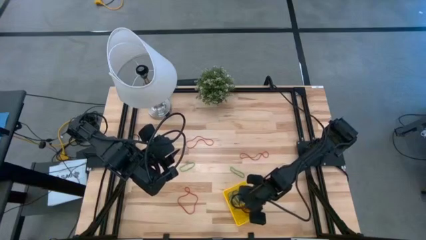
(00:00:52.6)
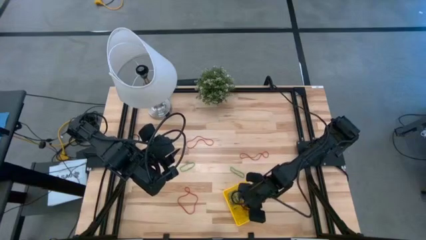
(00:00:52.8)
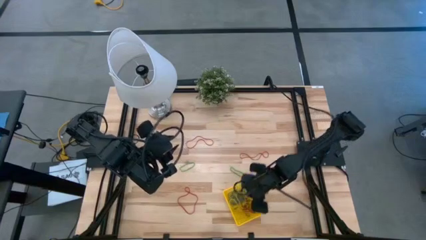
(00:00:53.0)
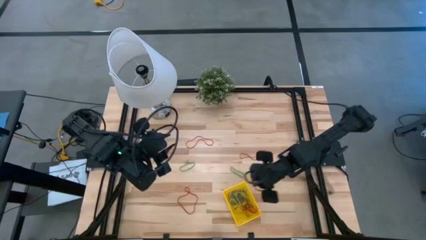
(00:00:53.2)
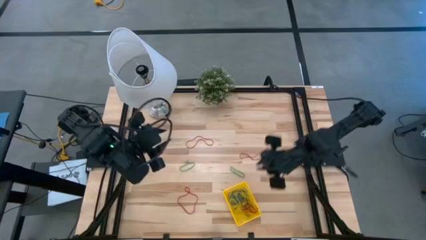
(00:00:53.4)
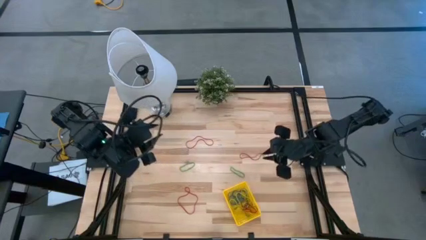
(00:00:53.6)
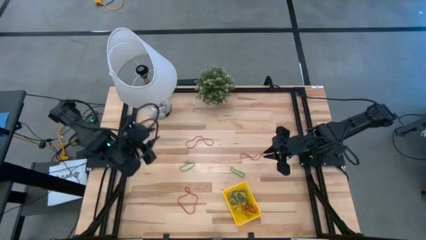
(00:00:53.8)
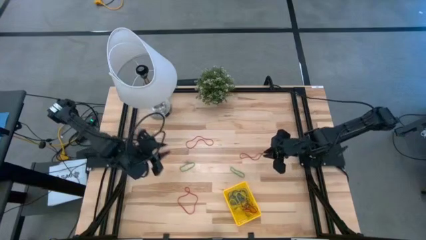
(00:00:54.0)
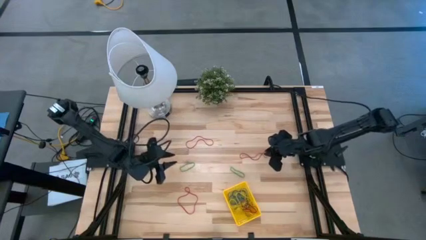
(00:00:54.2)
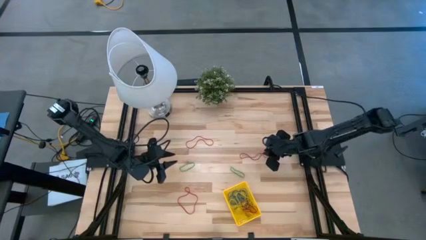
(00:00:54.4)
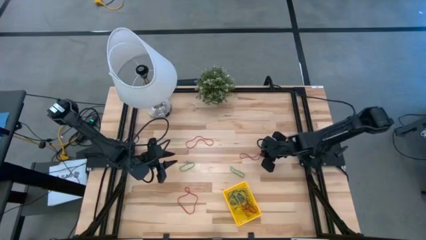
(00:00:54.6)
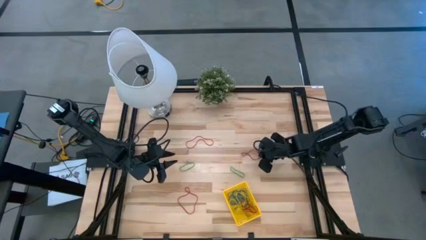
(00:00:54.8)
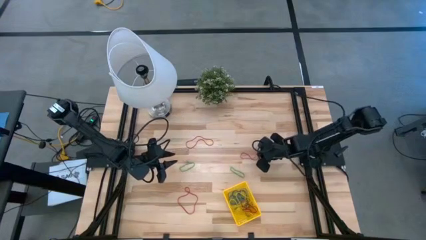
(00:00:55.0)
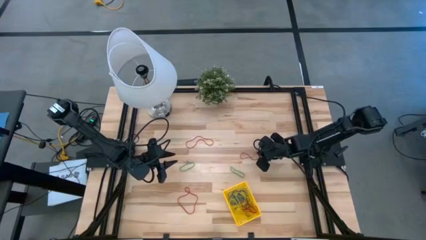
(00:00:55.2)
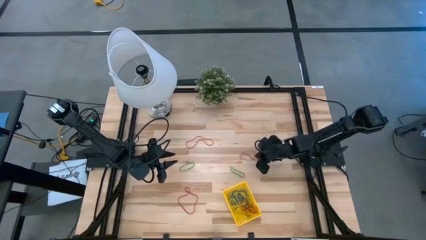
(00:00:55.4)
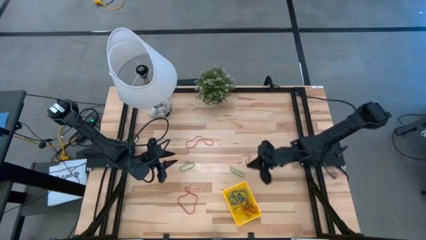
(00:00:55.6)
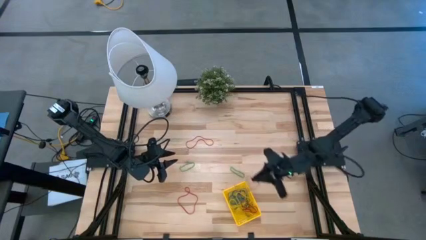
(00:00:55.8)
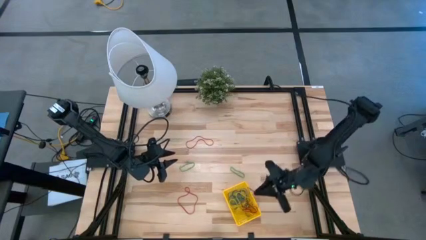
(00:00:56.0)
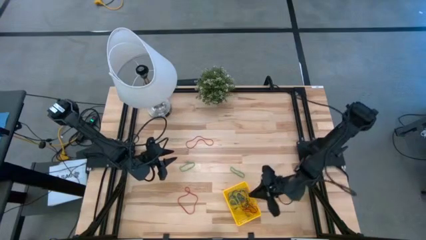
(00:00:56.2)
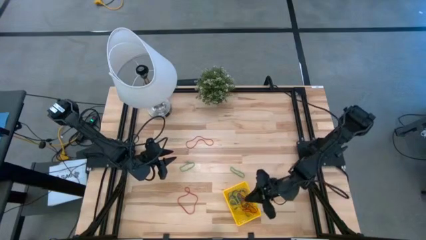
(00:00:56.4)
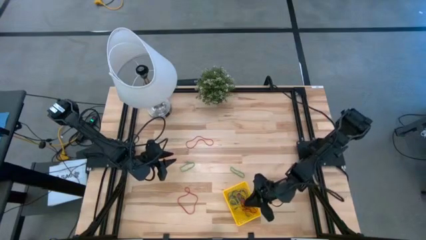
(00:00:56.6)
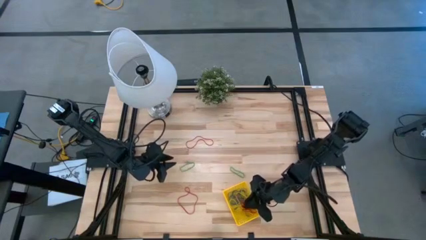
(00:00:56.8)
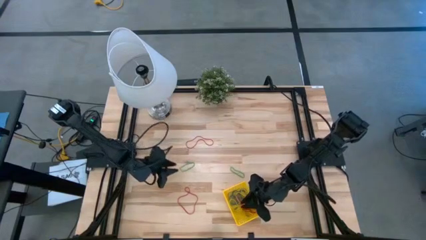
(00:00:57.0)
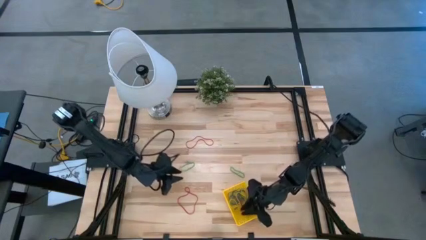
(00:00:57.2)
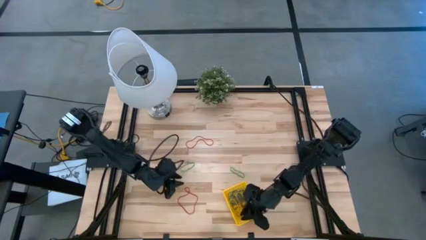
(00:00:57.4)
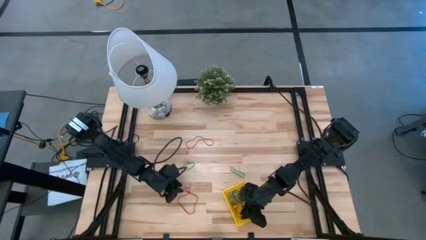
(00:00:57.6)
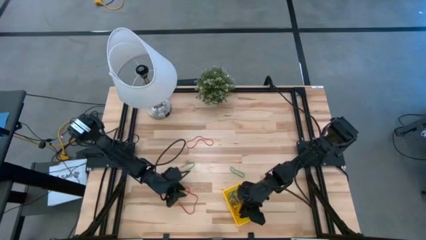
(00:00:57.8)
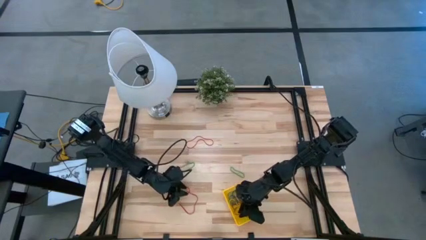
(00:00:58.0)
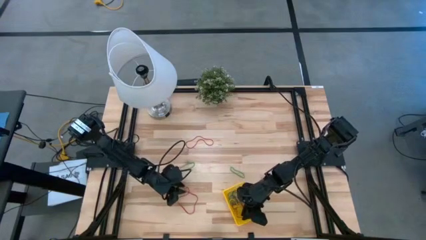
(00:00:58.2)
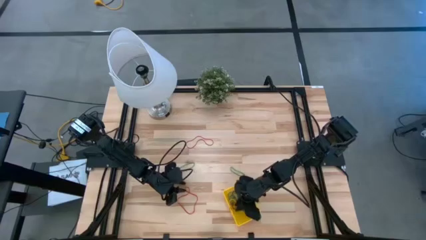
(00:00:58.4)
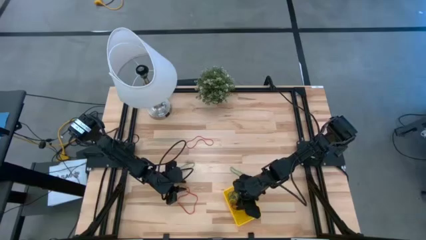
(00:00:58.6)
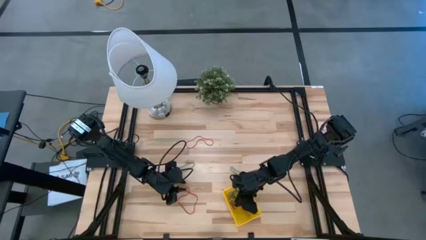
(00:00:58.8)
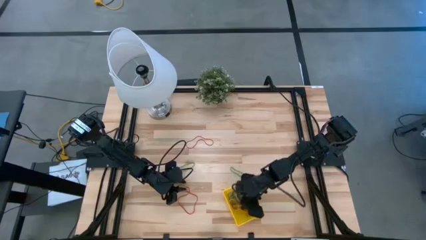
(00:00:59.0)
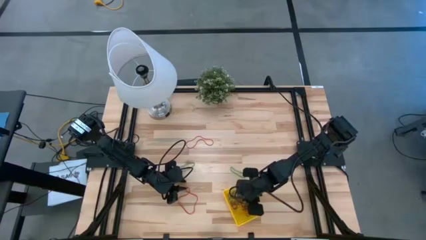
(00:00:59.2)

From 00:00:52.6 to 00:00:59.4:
Task: Pick and place items into bin
Put the right red rubber band into the bin

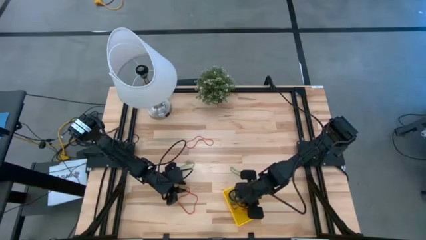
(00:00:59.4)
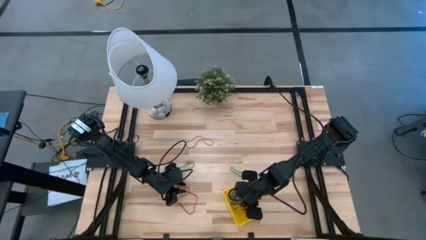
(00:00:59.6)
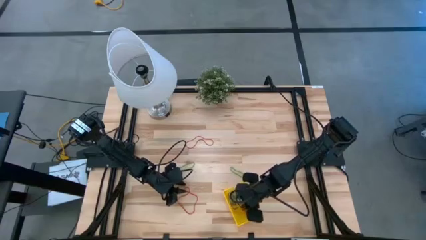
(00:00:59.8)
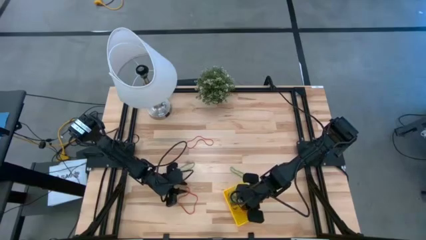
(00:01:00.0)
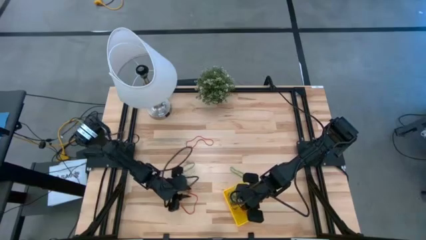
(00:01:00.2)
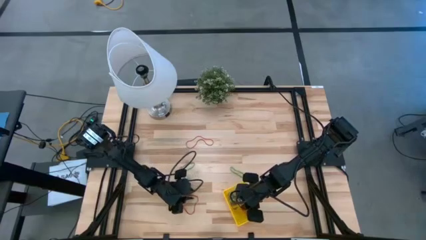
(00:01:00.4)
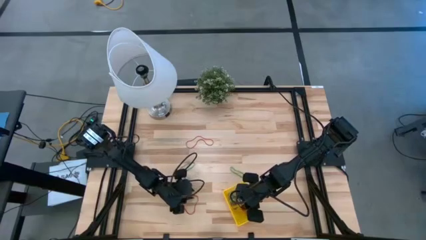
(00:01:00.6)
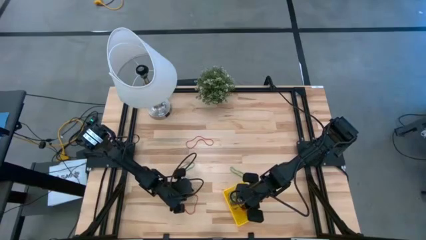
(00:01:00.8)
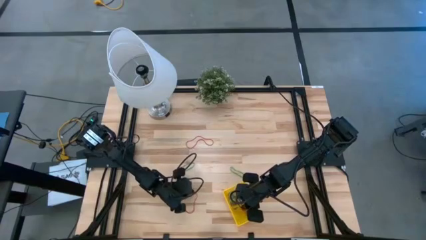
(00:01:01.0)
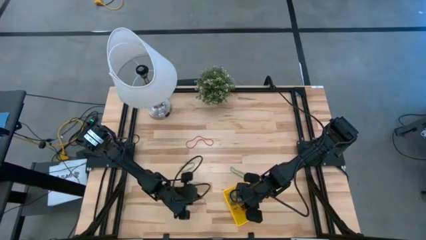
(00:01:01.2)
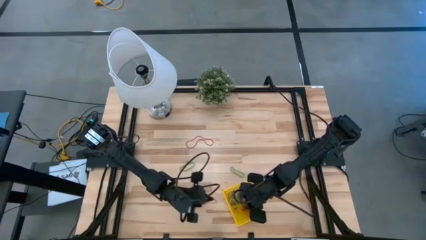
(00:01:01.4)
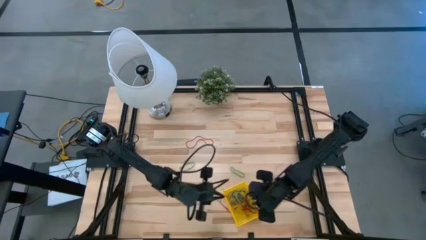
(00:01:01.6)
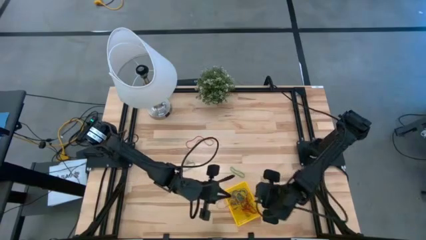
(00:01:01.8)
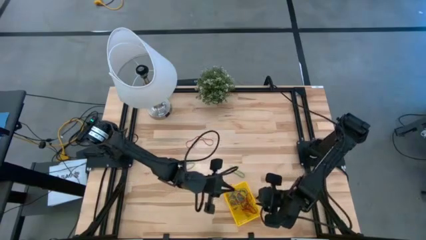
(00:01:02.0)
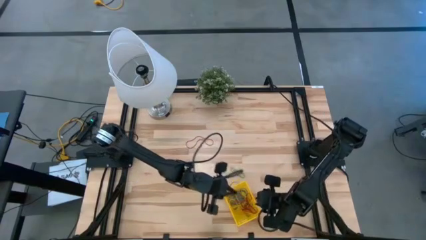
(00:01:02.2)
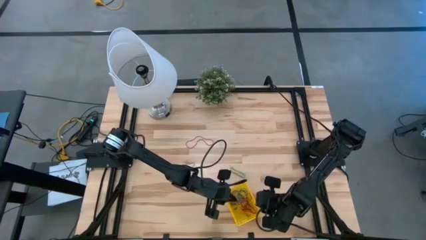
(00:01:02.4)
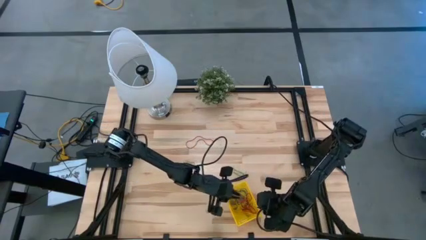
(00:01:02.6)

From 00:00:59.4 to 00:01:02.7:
Put the bottom red rubber band into the bin

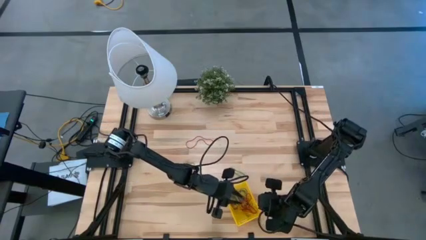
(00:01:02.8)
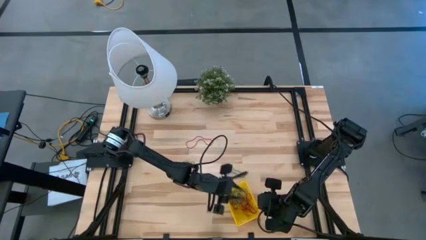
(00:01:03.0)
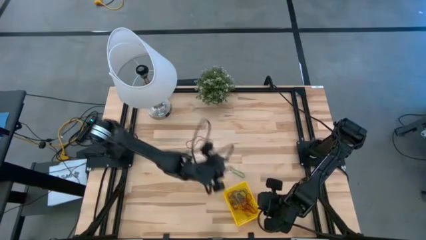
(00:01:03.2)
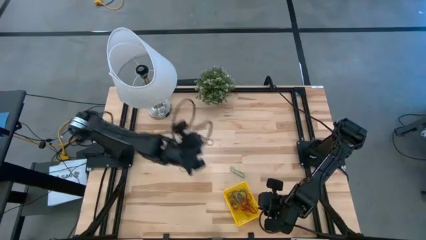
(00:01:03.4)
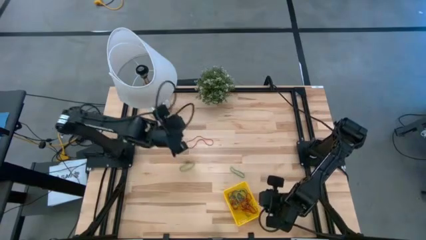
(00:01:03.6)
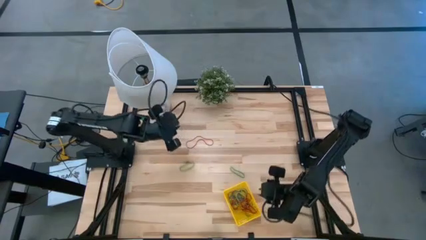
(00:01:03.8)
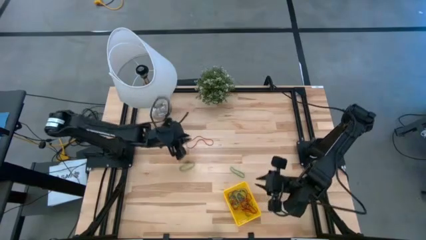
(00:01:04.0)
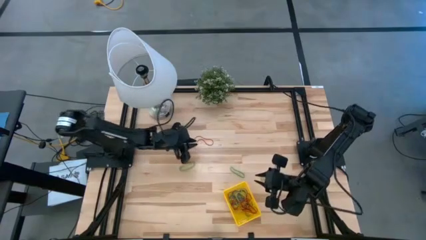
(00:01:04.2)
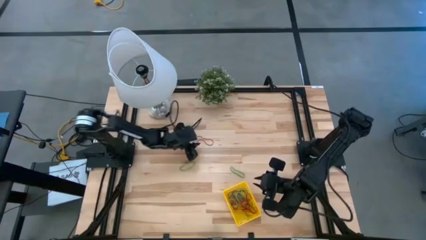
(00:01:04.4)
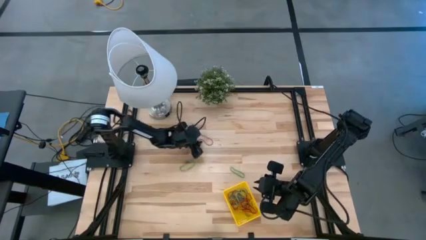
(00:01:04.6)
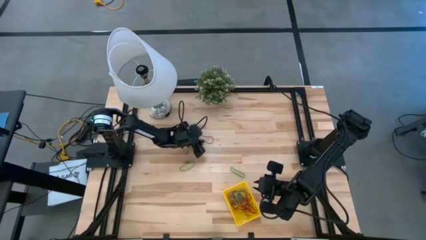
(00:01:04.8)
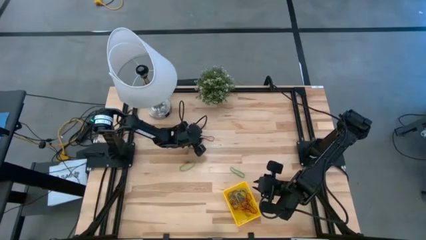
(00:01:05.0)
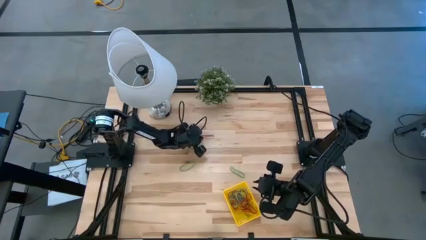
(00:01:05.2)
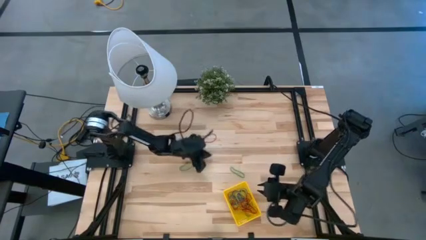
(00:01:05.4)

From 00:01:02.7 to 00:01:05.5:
Put the red rubber band into the bin

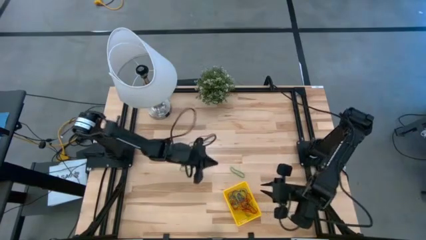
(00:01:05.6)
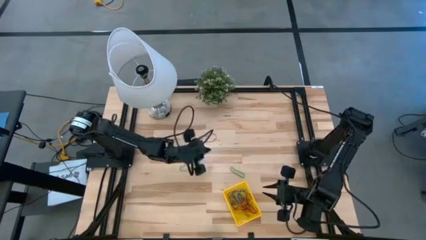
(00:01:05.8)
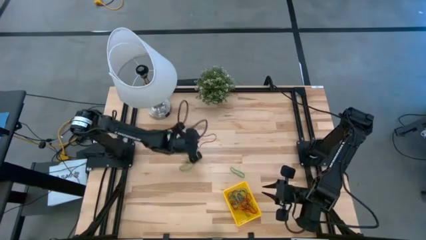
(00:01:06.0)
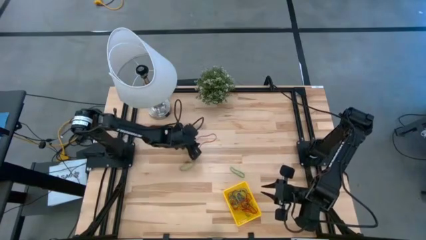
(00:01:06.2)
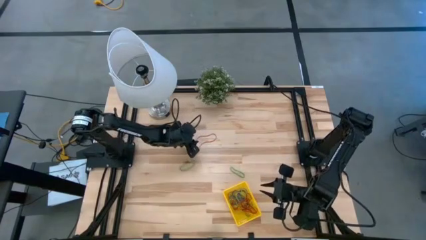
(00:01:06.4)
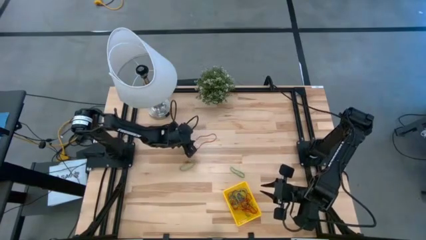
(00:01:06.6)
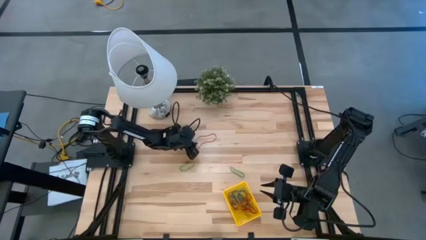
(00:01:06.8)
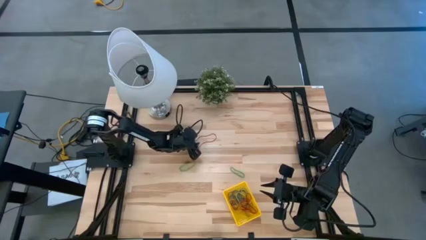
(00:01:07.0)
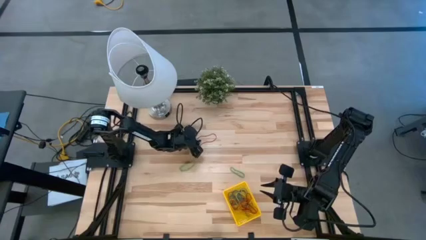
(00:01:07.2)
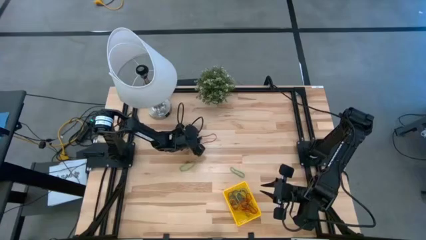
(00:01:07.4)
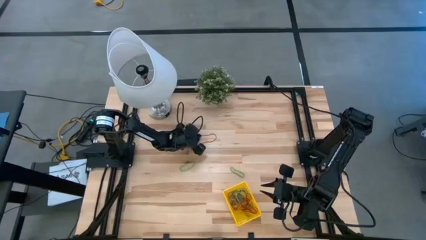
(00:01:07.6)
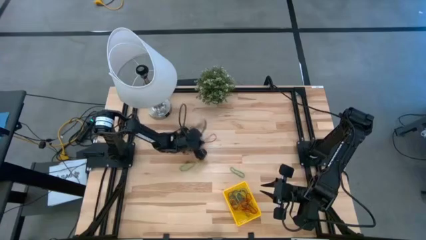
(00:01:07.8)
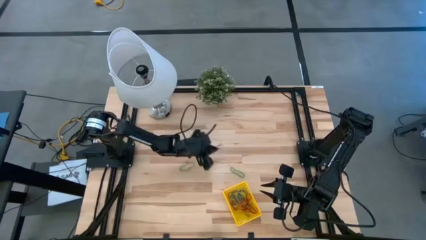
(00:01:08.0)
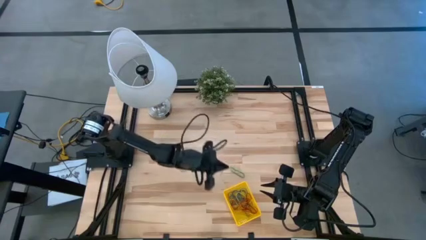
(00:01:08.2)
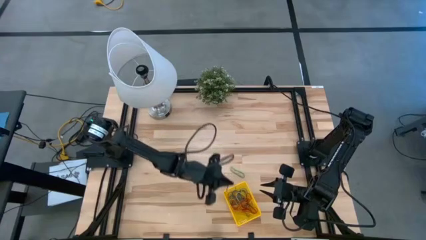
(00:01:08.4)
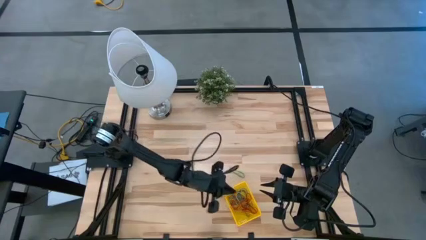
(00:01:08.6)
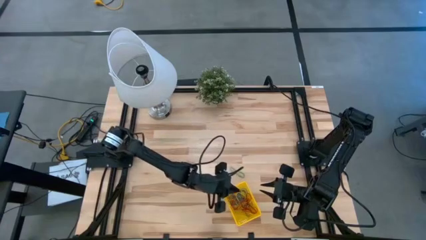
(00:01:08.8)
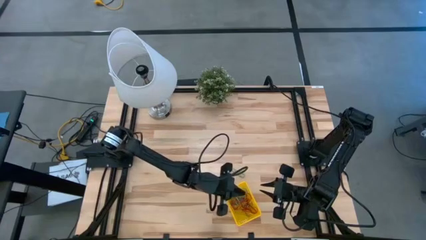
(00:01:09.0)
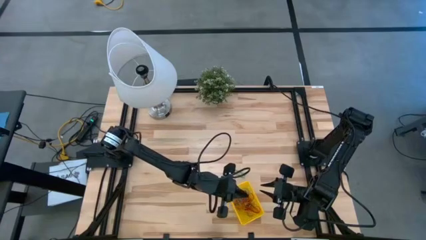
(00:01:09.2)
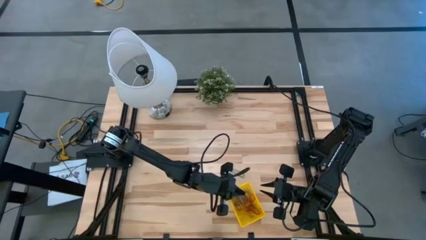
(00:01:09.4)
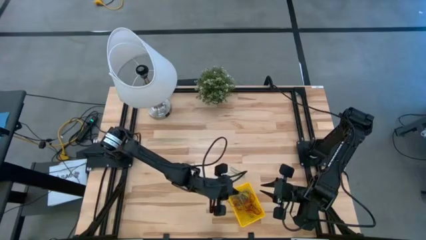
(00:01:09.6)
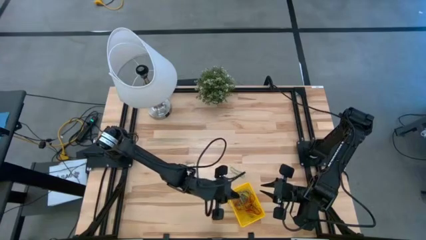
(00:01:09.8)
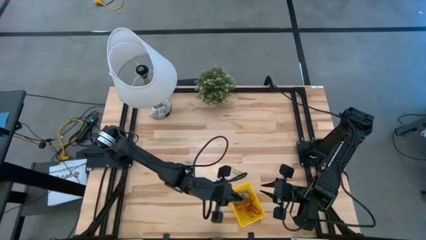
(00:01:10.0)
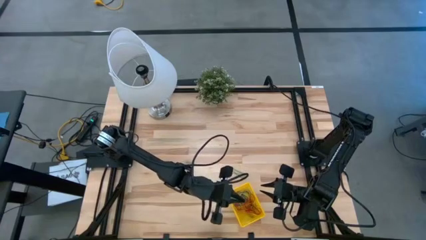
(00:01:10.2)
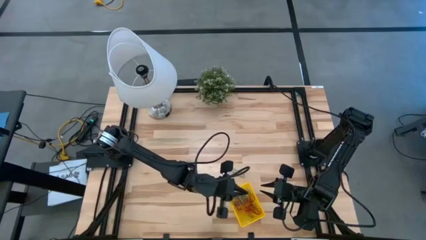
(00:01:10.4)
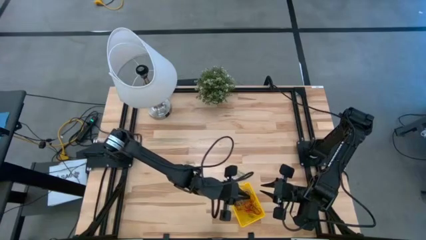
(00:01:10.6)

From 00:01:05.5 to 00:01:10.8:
Put the red rubber band into the bin
